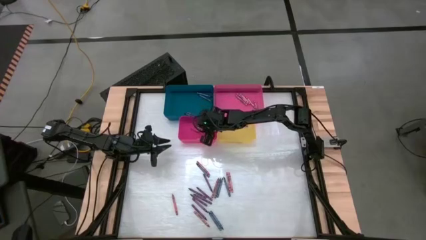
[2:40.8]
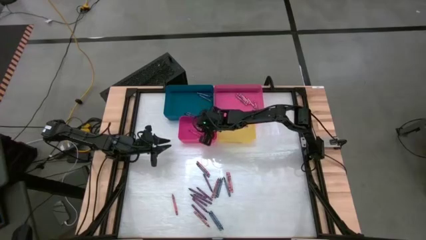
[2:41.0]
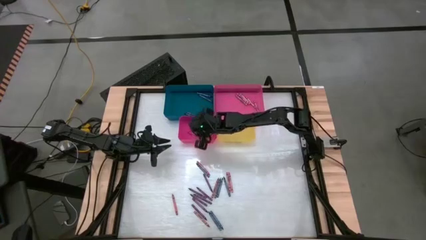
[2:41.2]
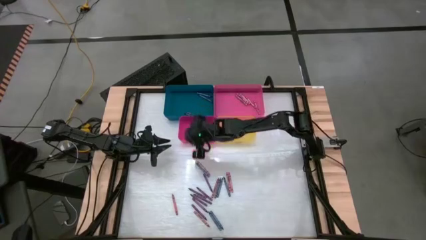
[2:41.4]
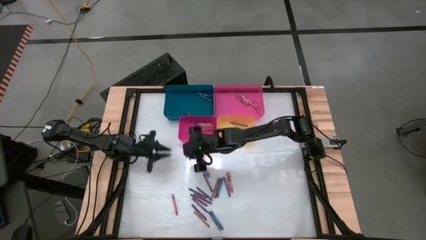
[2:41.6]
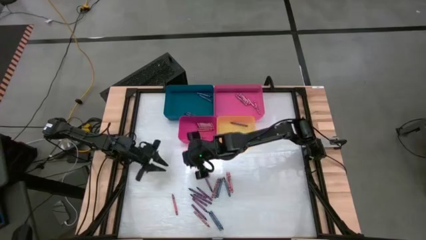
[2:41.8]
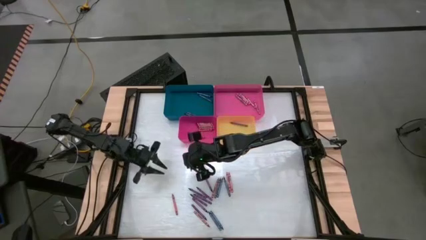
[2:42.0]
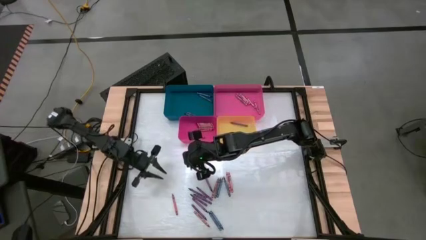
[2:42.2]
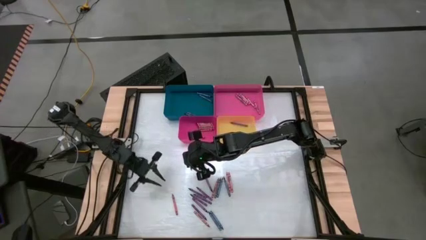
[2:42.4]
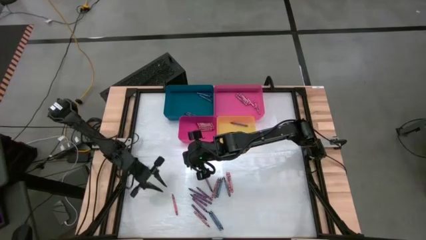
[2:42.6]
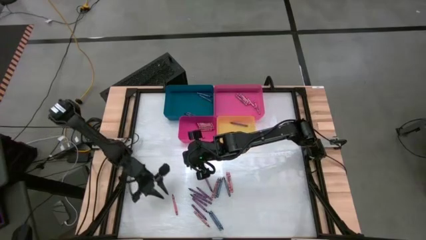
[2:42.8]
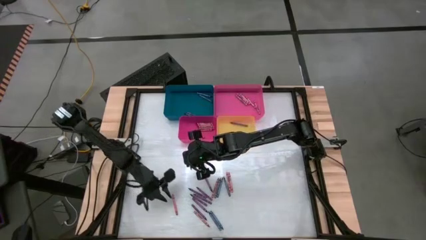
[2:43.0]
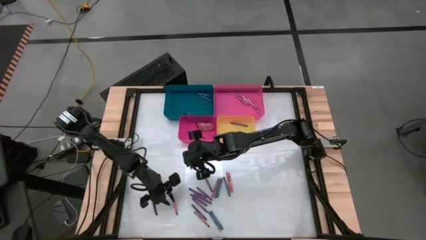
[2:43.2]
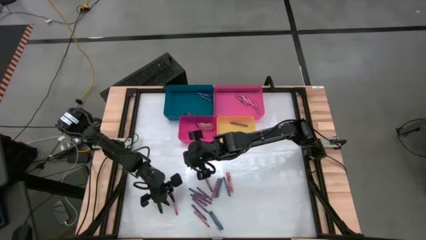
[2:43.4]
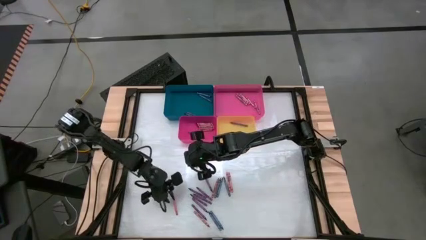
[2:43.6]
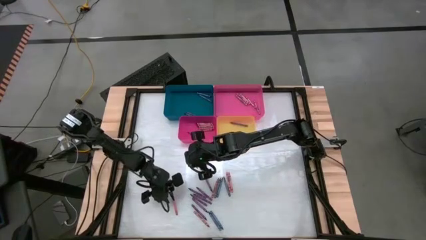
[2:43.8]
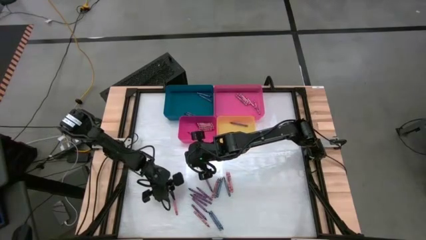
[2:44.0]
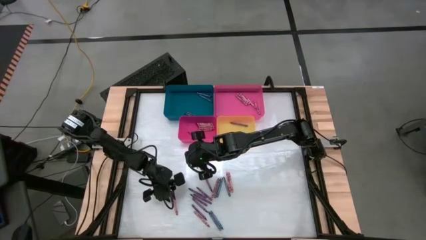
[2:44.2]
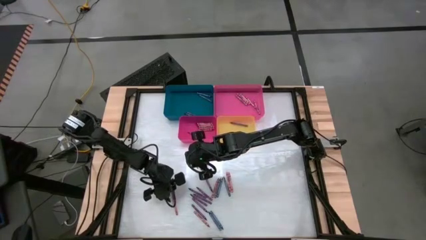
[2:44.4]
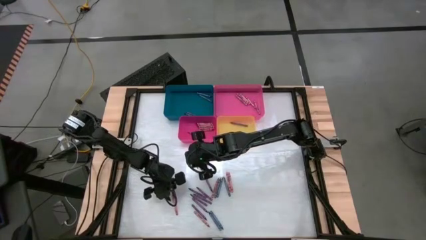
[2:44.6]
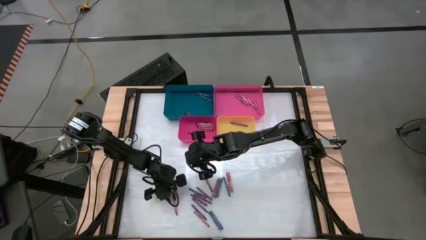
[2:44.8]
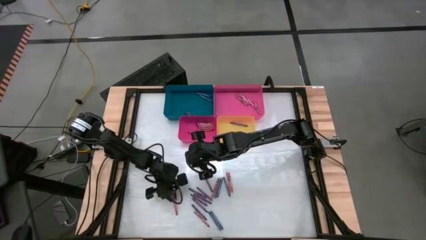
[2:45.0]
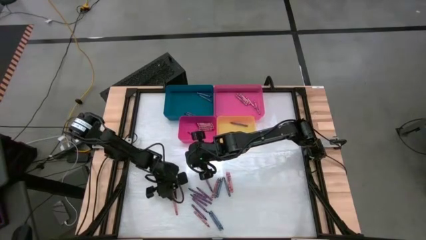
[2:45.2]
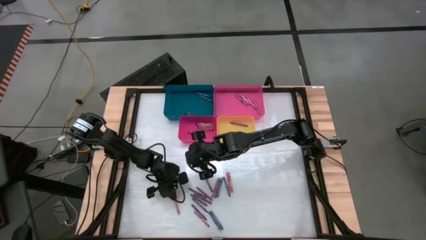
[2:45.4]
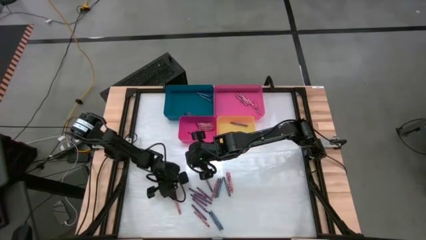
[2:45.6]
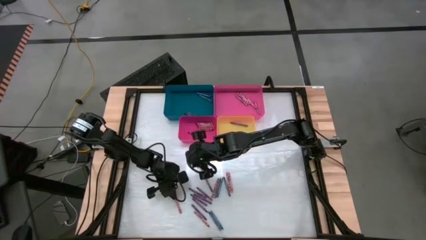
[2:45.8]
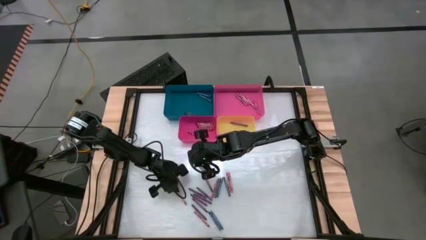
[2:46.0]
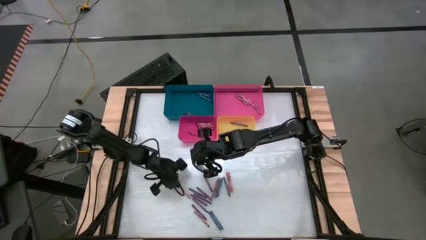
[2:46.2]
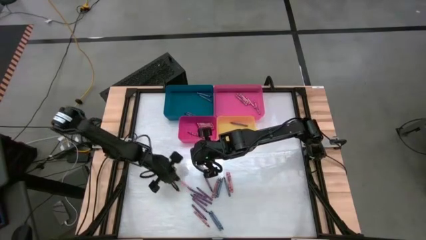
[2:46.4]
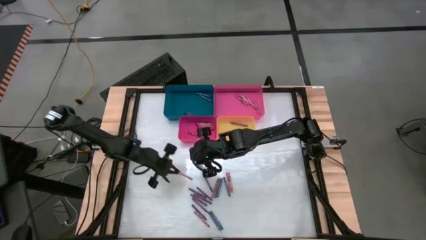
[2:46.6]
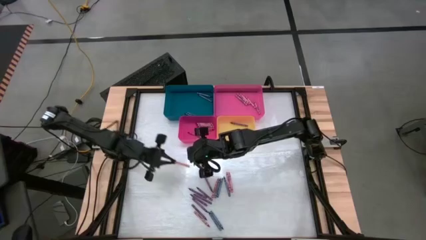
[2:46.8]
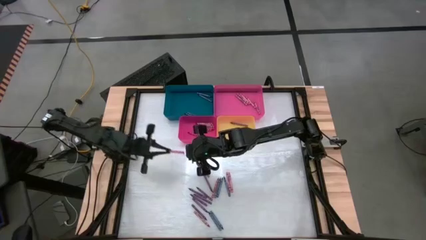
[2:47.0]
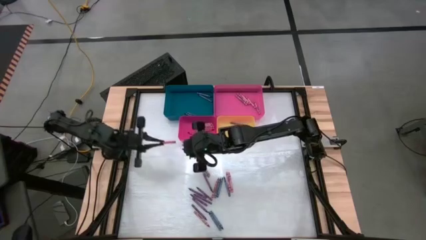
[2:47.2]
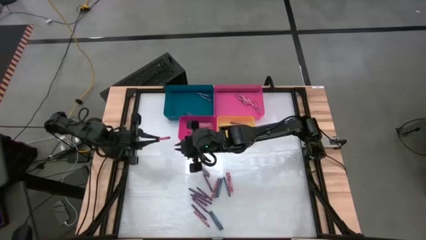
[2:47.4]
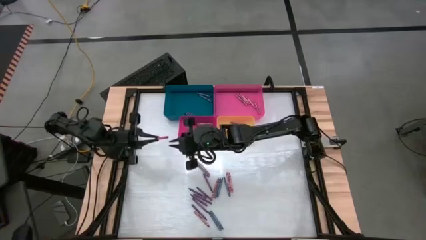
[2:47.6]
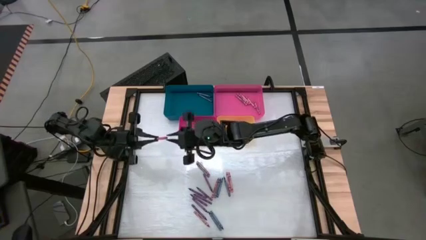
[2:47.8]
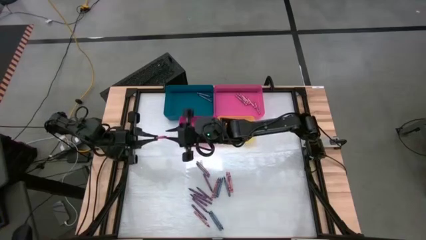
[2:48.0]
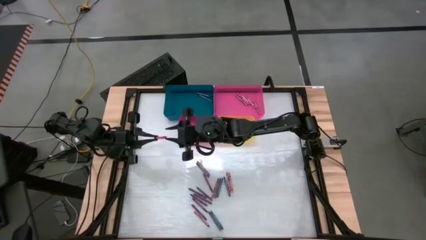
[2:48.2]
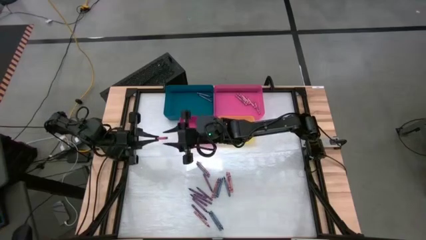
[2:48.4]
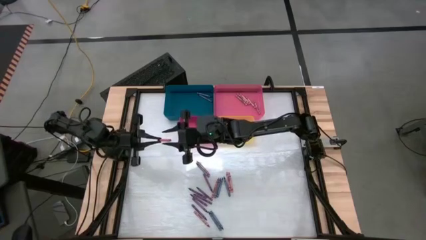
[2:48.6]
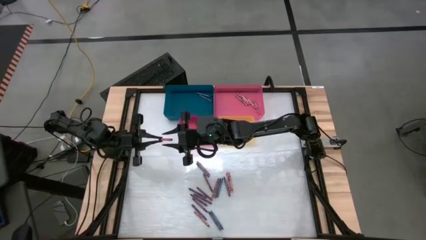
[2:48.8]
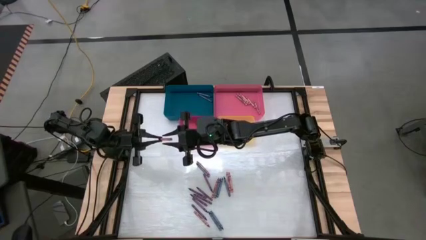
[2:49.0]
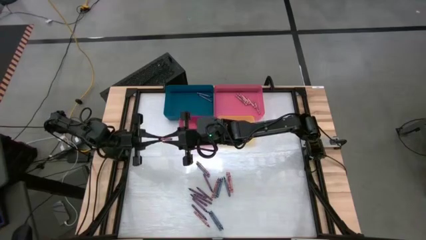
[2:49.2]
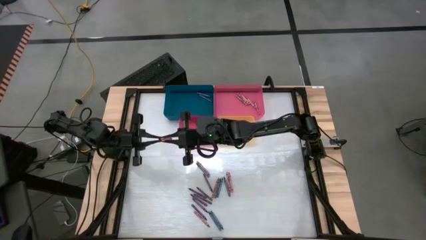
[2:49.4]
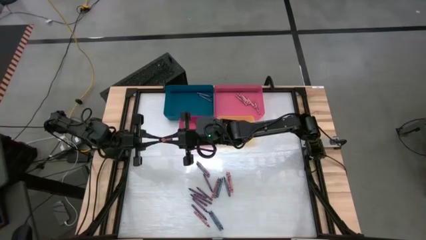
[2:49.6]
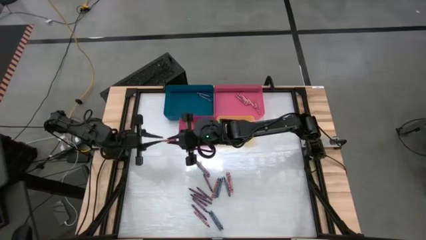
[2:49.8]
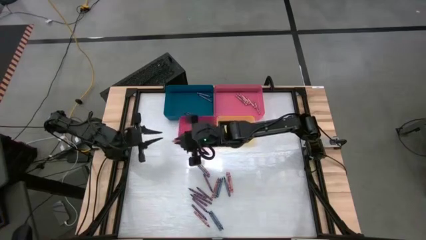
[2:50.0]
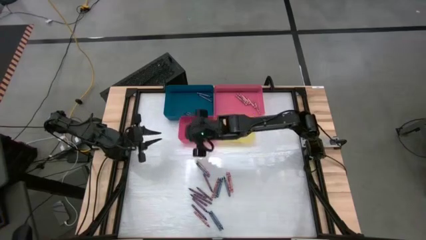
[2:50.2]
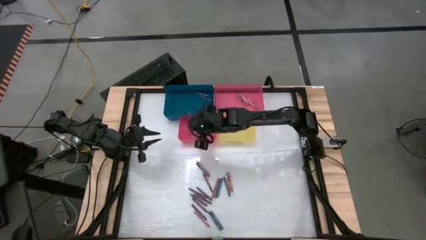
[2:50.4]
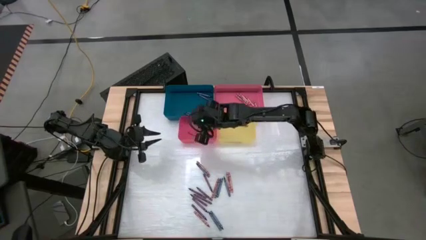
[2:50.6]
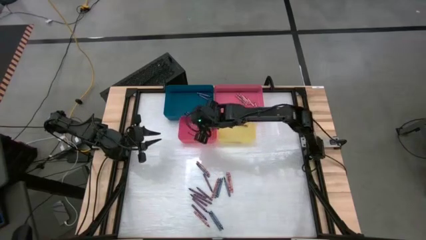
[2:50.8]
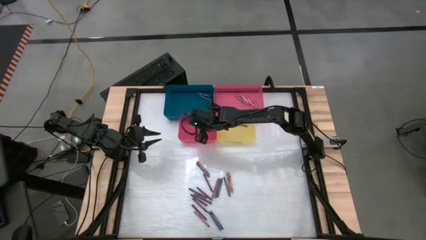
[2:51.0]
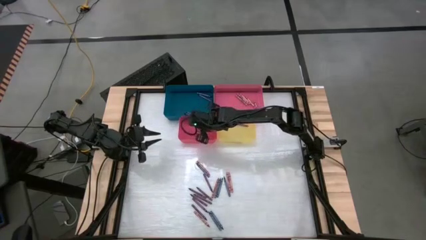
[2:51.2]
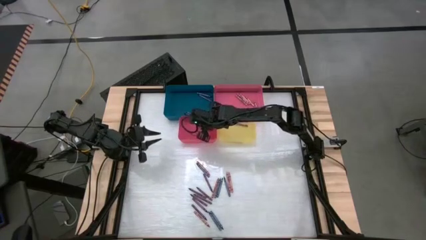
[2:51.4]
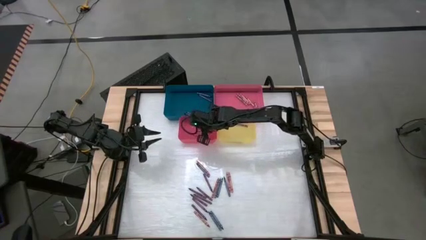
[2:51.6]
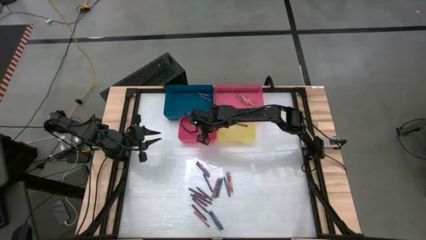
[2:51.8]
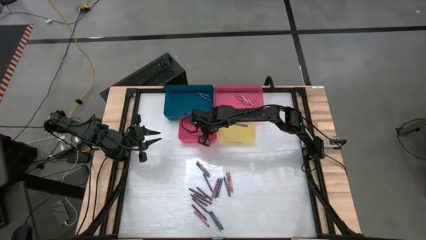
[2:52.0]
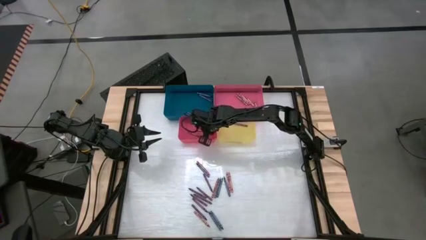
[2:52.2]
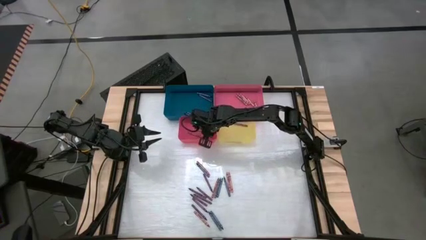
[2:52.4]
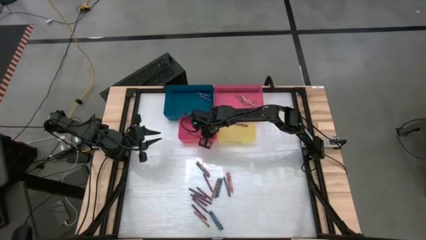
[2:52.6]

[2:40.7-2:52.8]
Task: Sort crayons
Put the red crayon into the red bin

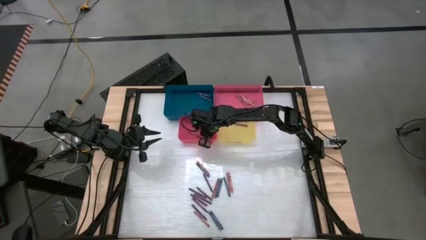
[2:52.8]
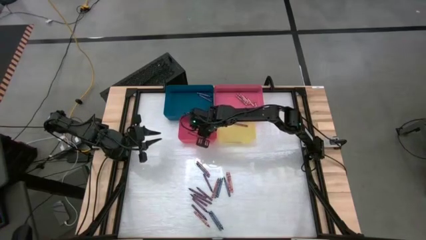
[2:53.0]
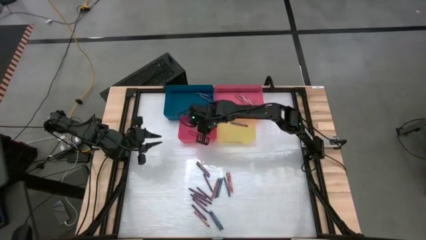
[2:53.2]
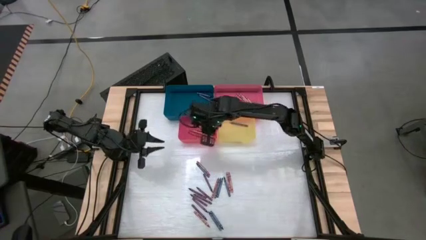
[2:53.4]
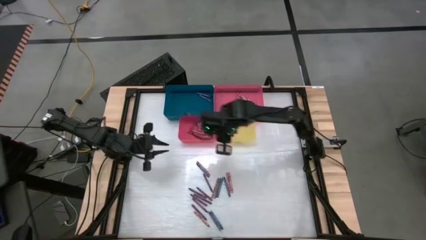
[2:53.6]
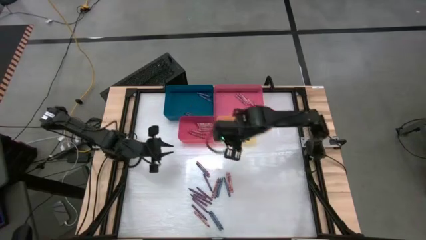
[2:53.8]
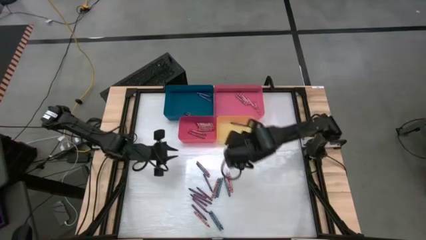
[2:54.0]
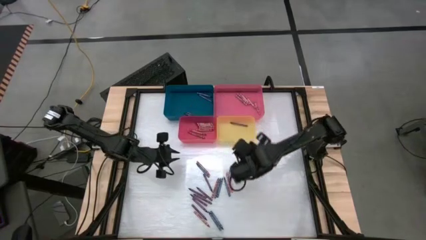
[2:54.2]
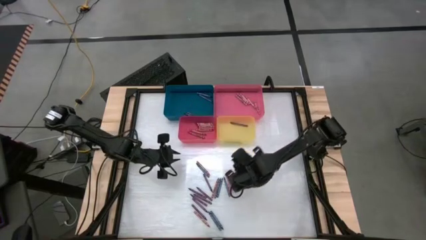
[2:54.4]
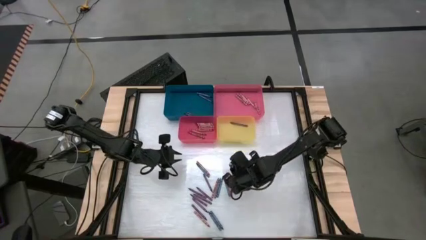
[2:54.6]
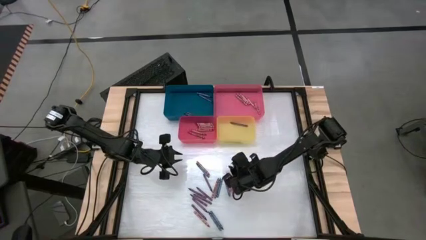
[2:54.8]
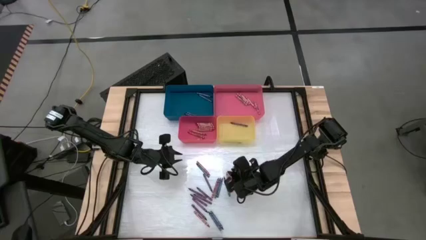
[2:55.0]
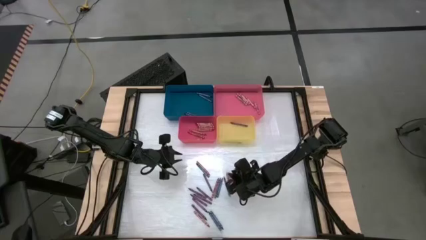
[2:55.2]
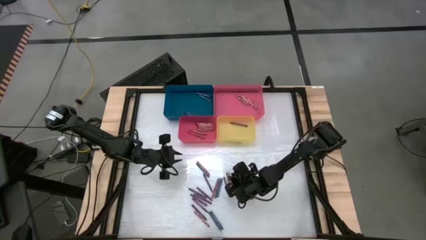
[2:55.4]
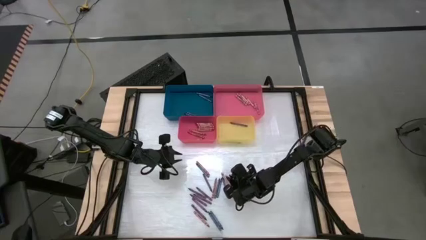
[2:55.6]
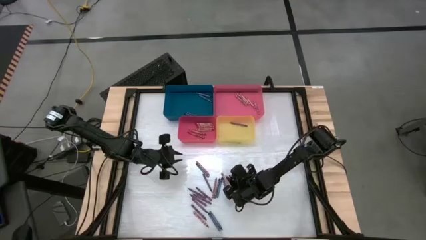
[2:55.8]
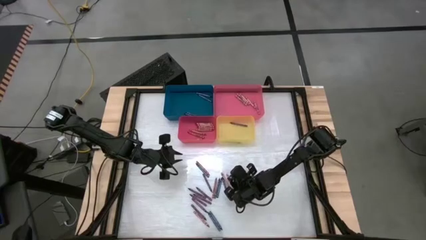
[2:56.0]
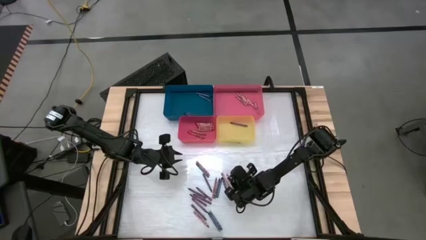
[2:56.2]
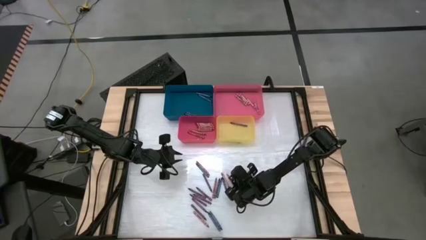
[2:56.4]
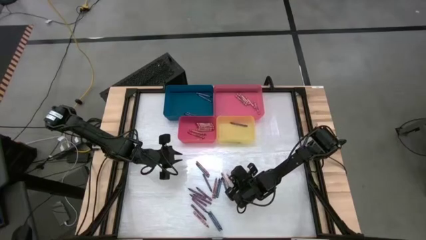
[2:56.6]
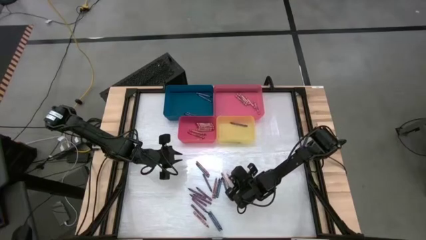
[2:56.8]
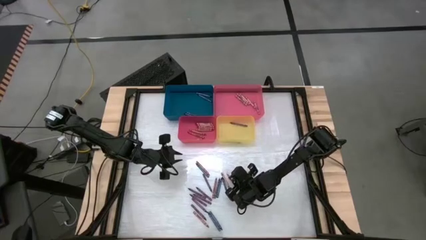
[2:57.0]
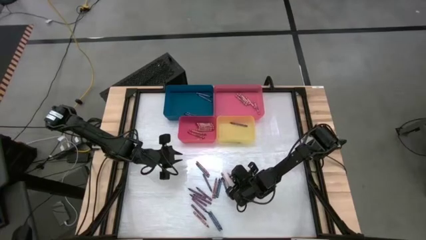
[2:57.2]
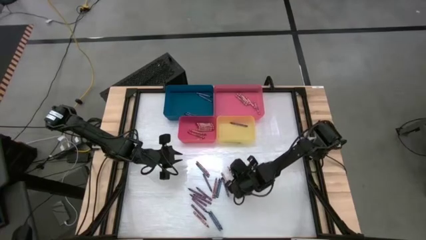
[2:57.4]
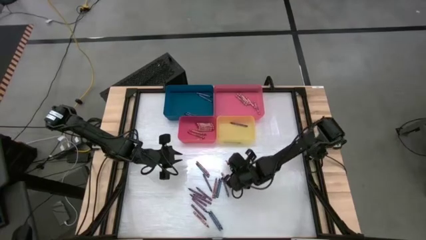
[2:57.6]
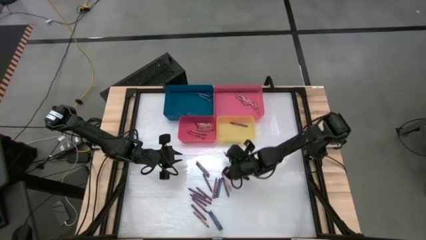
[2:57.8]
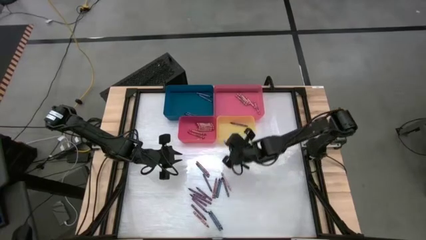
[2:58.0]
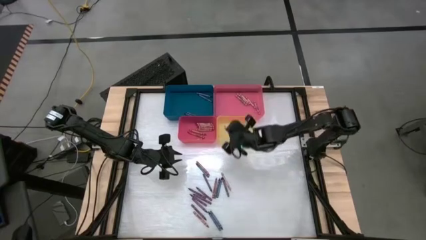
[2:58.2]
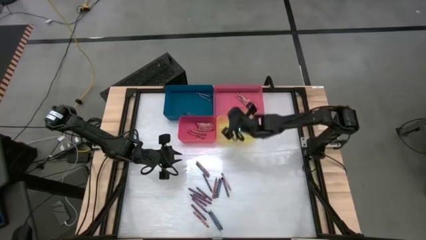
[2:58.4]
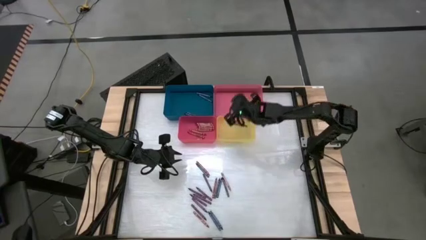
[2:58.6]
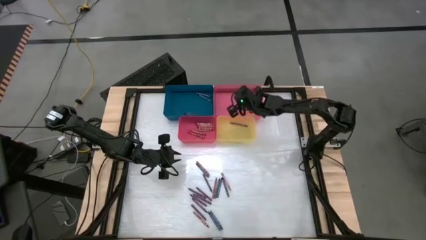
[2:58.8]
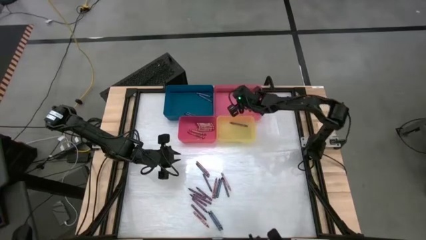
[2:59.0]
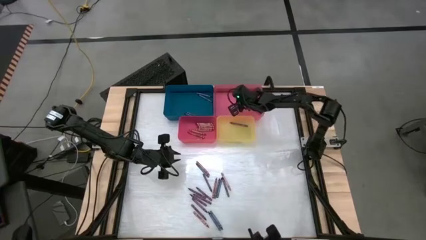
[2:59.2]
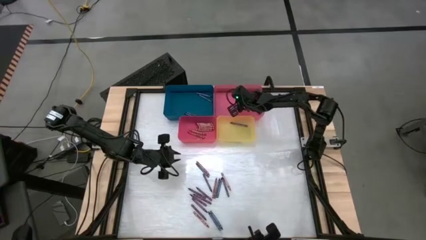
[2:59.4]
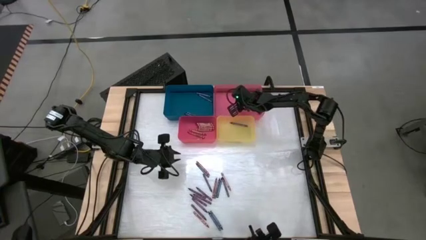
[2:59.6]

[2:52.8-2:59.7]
Put the pink crayon into the pink bin
